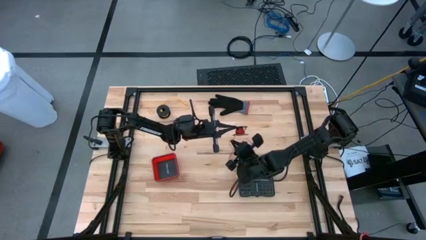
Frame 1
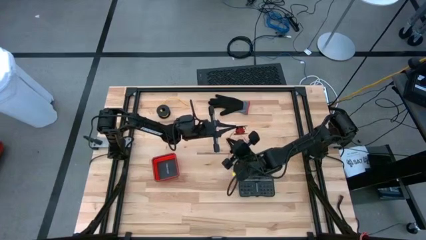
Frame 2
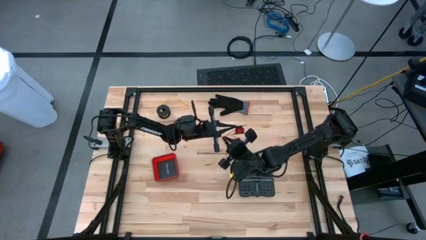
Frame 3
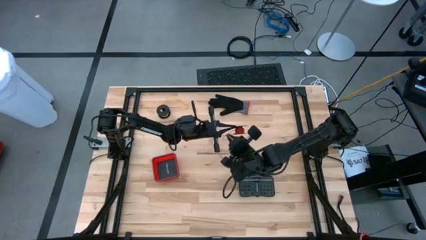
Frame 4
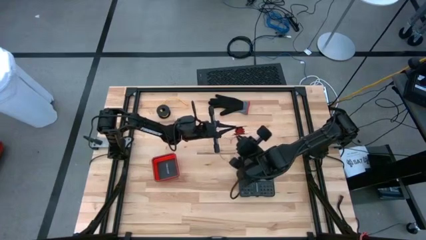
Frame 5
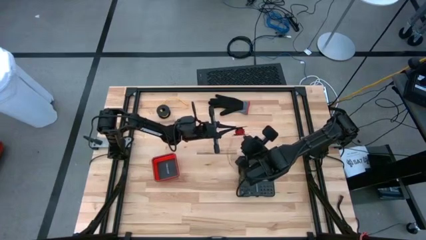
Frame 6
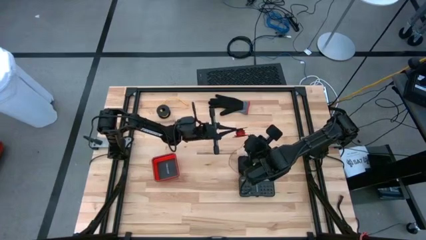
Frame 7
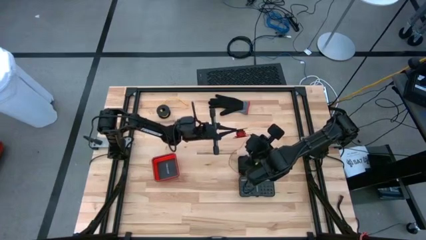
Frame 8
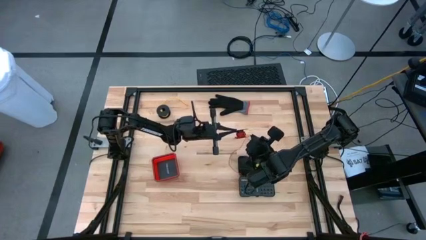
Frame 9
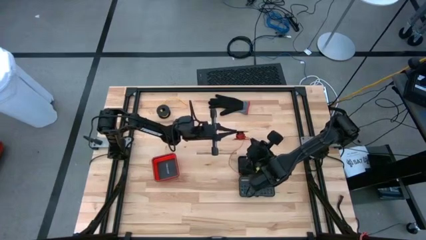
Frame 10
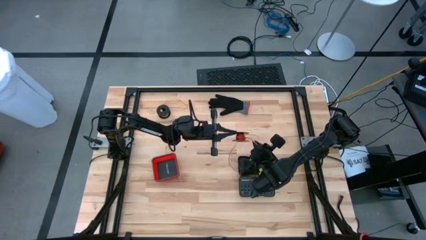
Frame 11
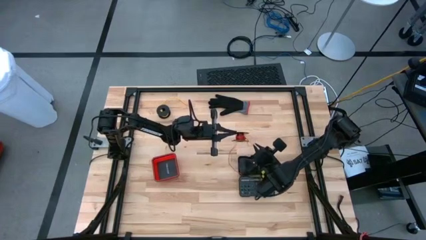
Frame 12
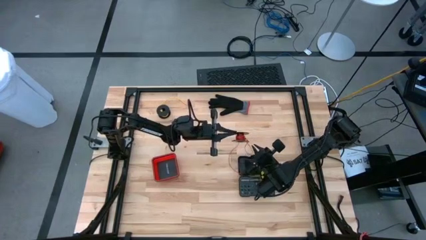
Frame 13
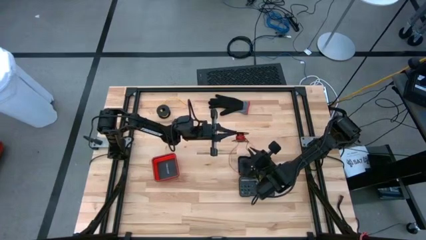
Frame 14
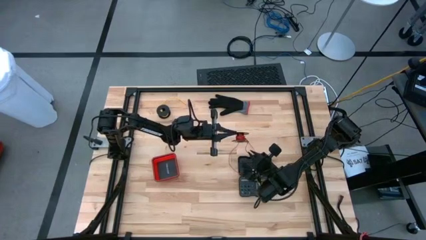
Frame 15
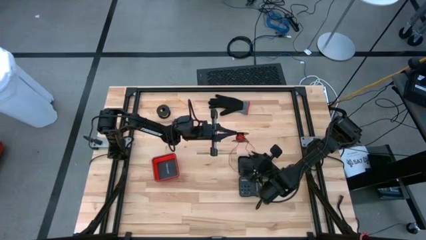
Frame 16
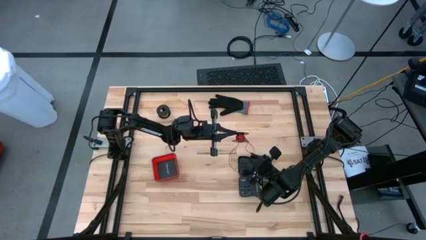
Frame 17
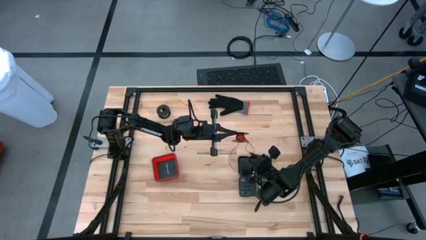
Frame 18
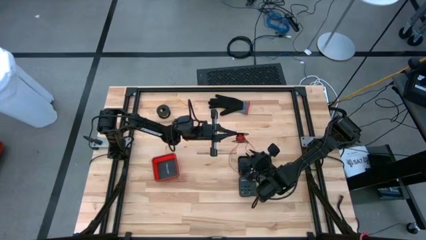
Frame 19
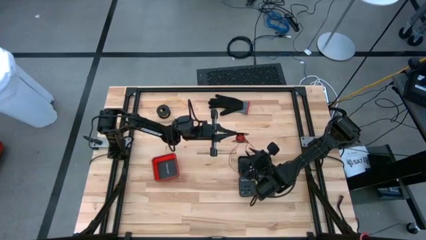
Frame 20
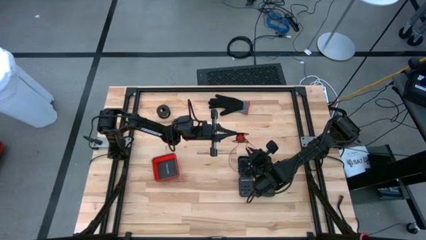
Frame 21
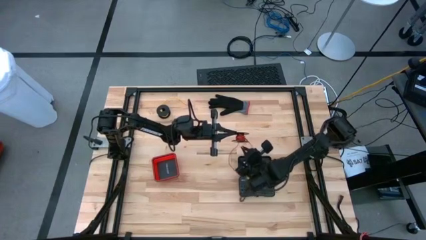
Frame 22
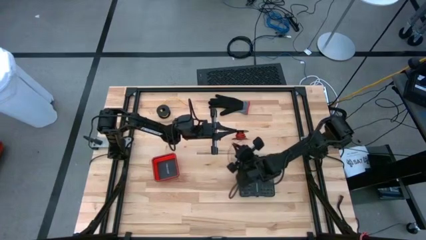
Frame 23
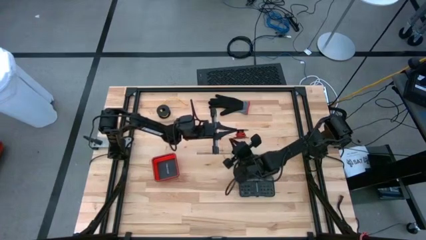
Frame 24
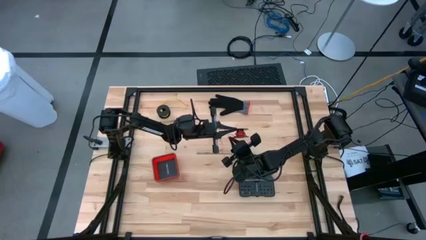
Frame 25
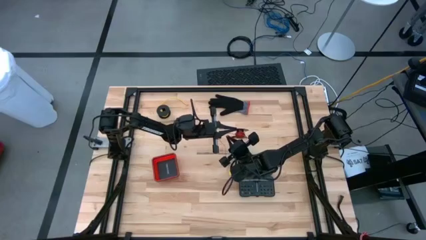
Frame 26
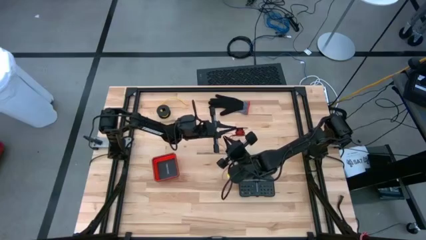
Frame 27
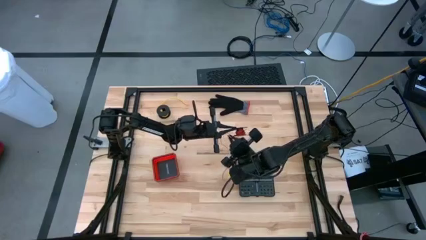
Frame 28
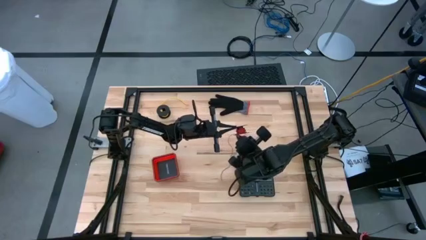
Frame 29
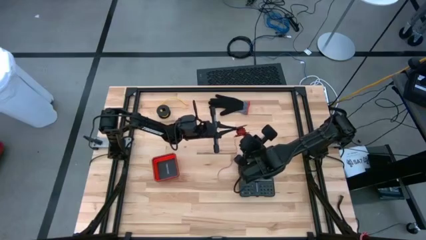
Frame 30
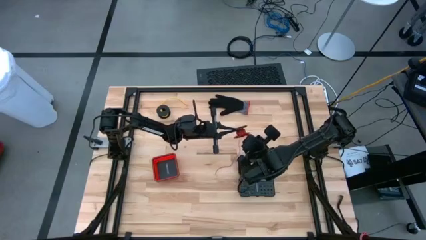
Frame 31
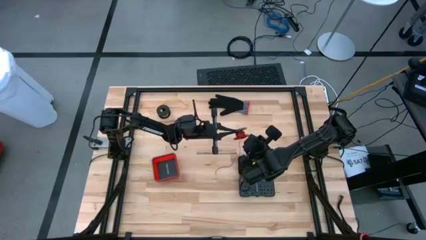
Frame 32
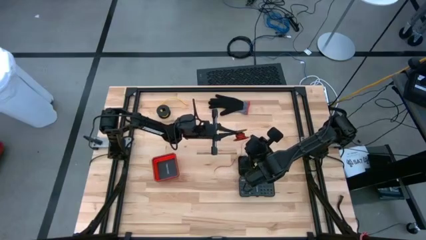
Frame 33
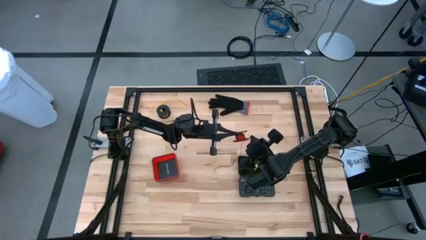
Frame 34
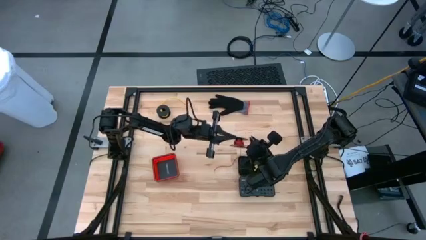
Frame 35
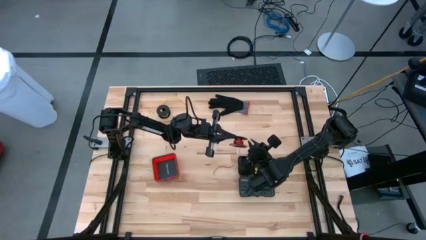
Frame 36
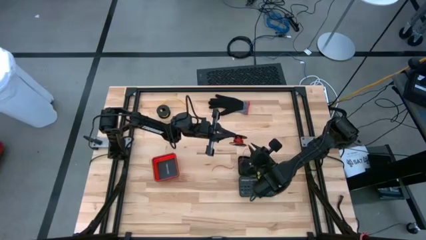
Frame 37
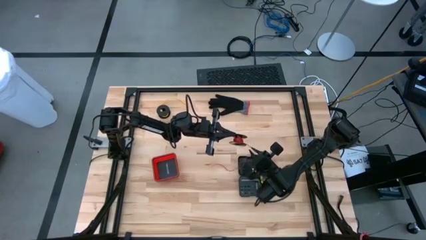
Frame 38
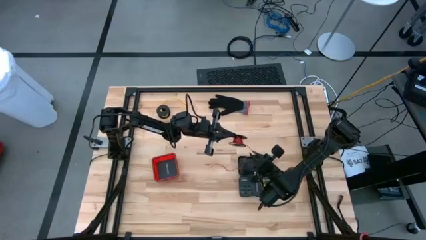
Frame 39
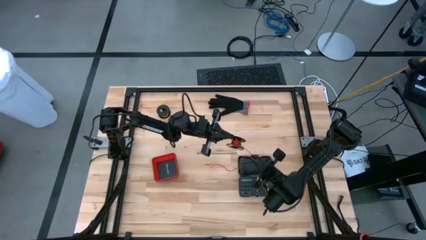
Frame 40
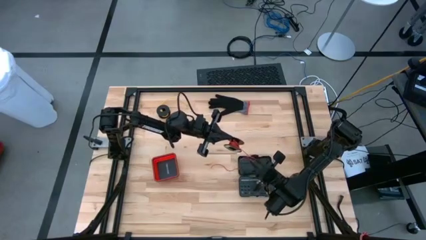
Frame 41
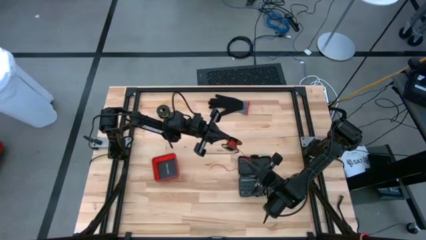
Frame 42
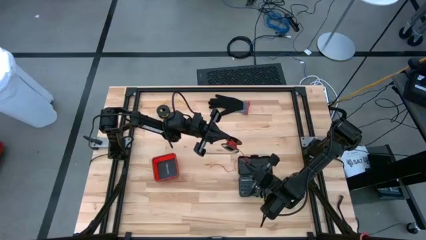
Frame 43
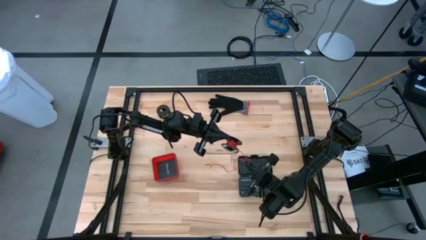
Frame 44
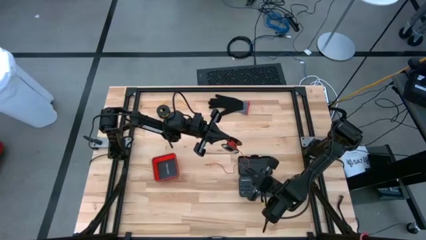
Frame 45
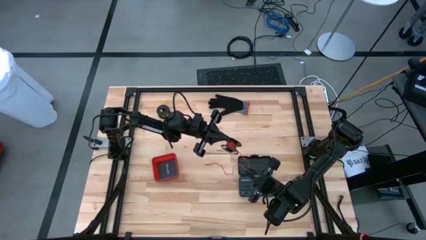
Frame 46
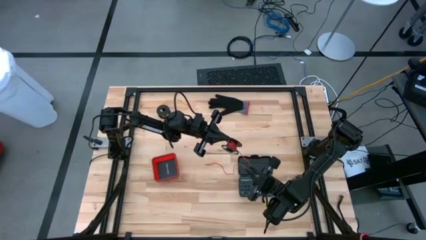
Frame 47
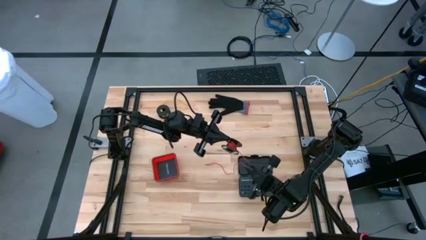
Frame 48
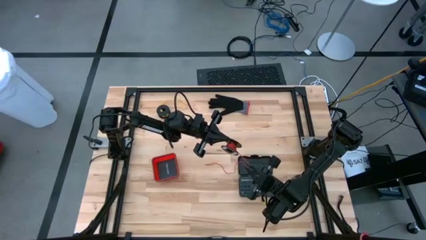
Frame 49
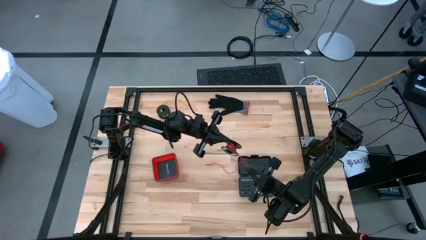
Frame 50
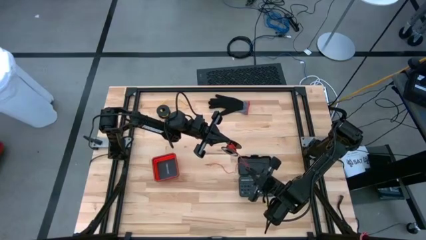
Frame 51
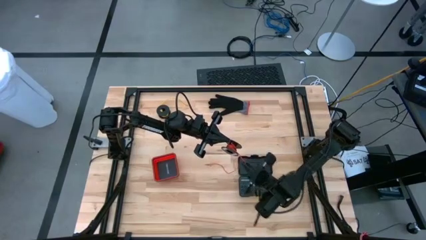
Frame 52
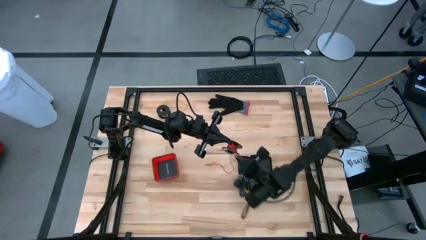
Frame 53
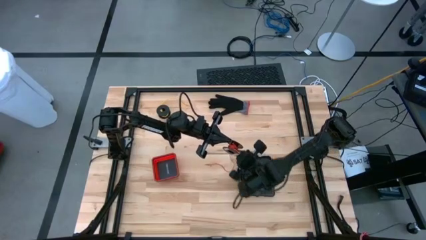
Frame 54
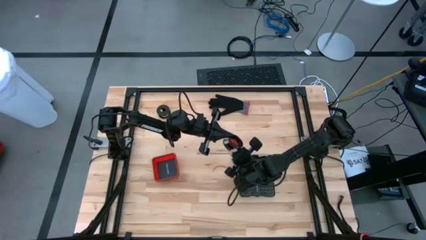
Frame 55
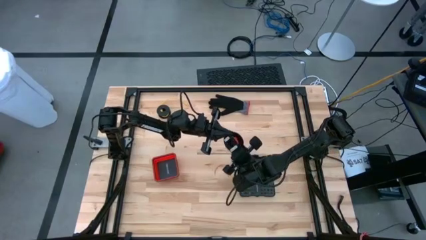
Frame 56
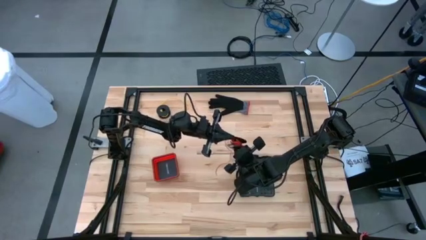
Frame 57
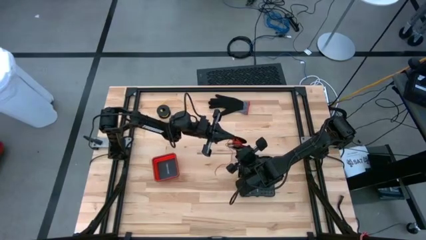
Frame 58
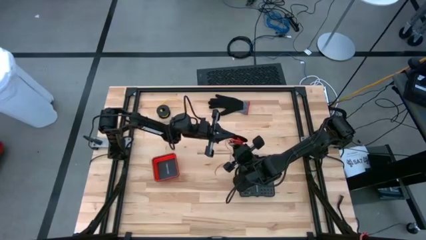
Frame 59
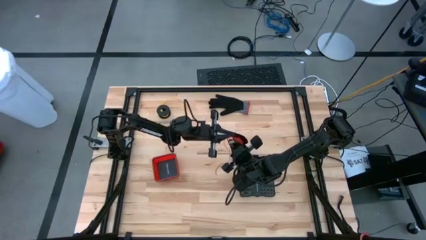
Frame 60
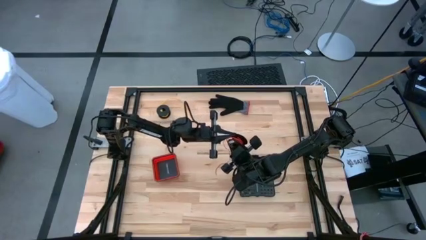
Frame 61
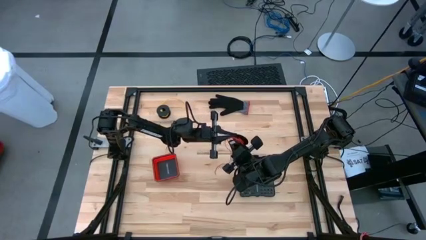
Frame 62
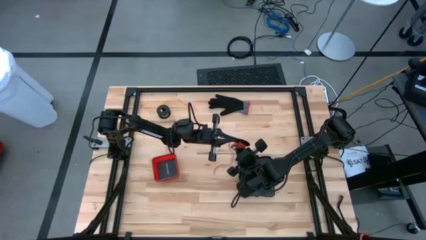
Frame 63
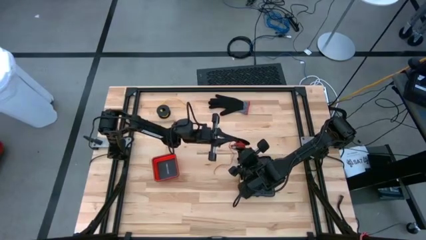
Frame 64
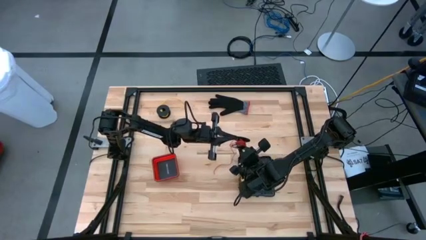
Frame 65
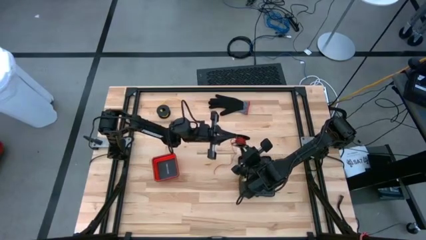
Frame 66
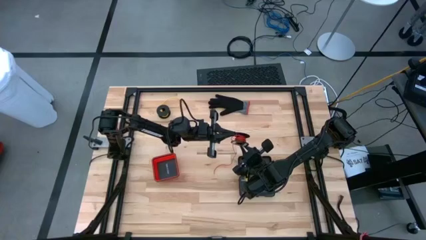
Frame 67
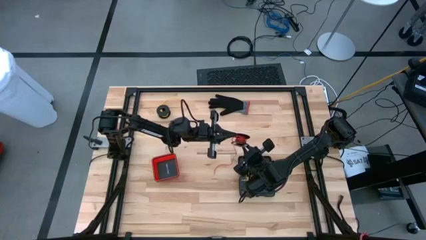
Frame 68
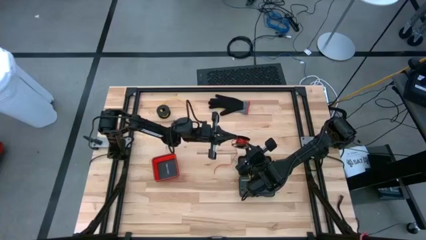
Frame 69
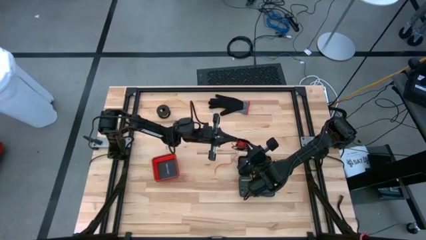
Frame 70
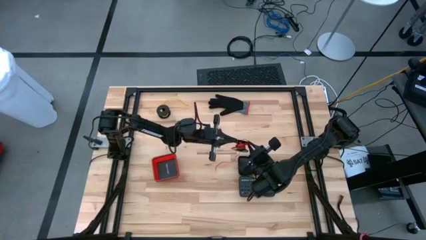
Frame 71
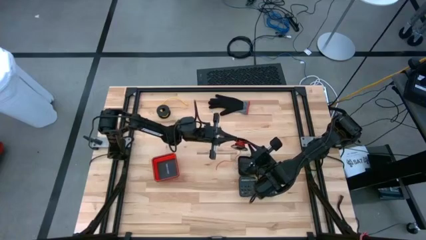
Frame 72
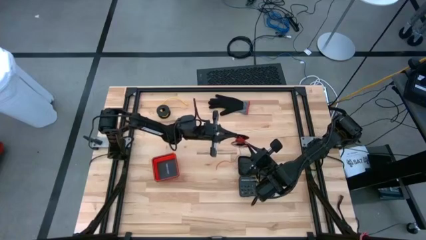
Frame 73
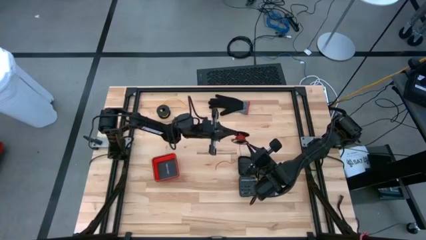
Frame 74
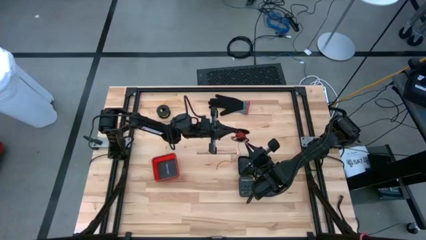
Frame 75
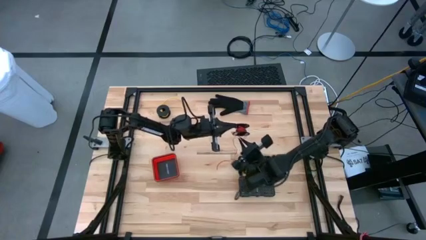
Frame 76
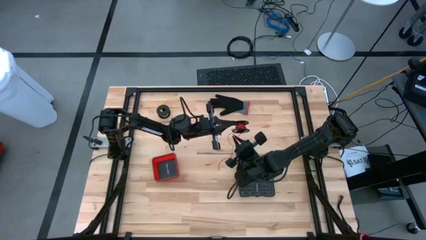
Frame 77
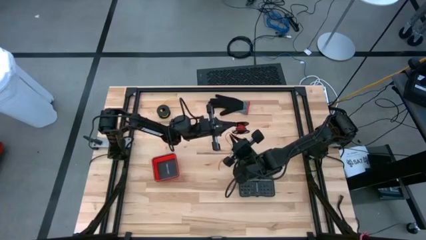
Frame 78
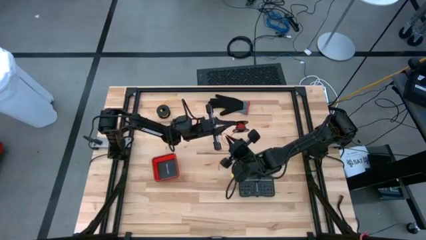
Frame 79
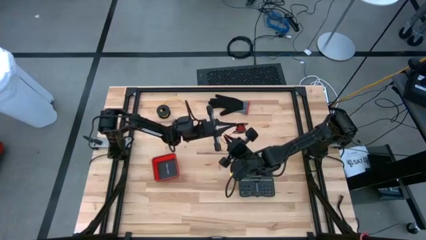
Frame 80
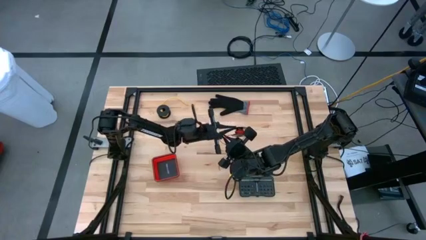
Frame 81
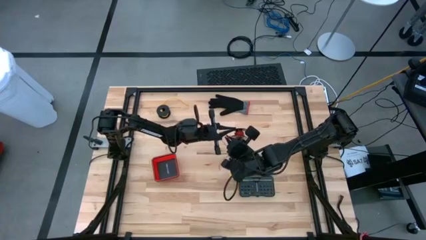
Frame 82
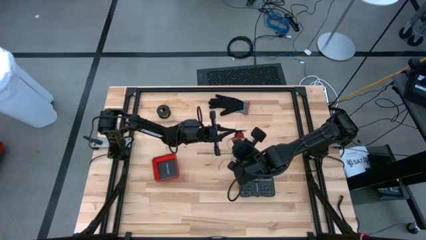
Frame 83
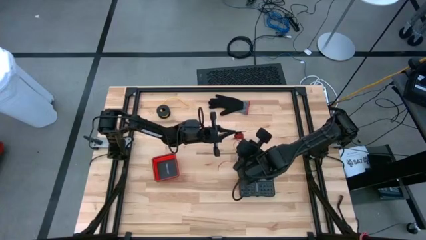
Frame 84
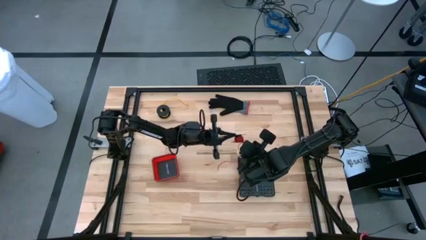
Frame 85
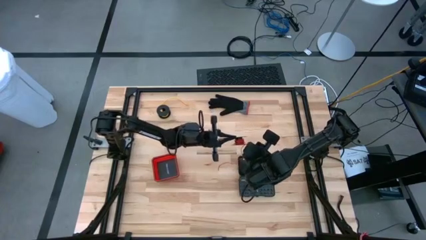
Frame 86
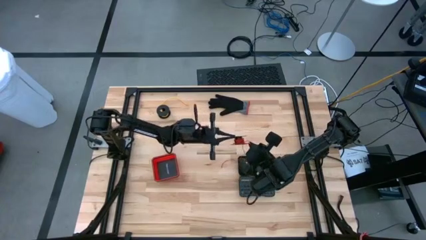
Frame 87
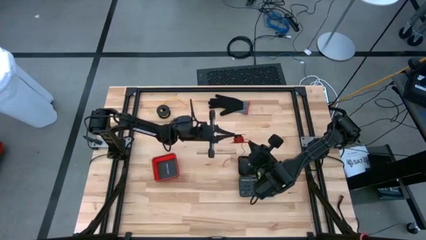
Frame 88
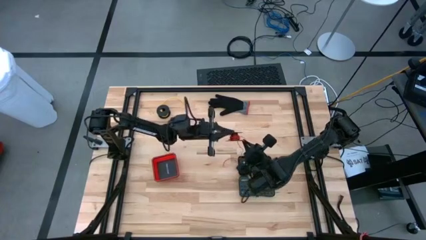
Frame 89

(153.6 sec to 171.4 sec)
Task: Coil cords
Coil the red wire onto the spool
